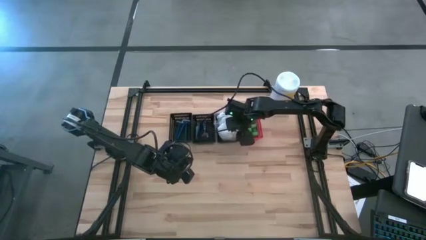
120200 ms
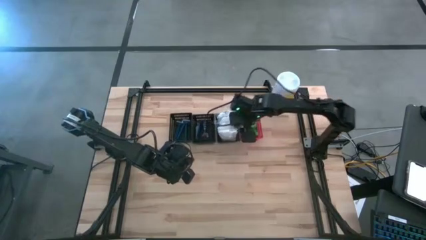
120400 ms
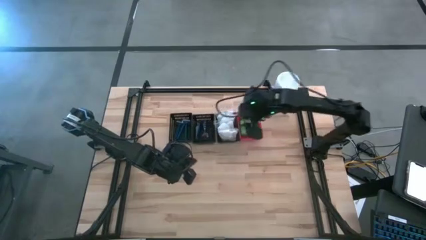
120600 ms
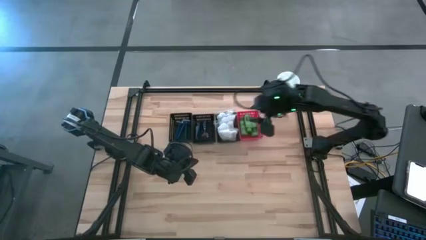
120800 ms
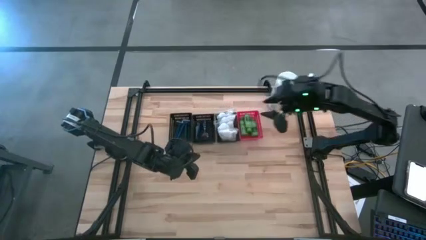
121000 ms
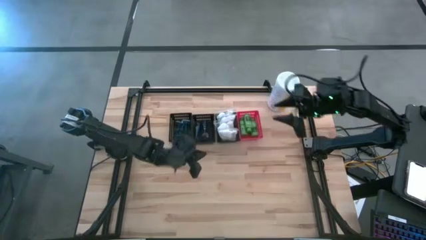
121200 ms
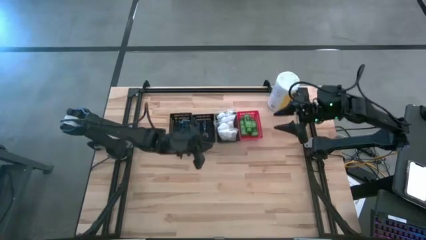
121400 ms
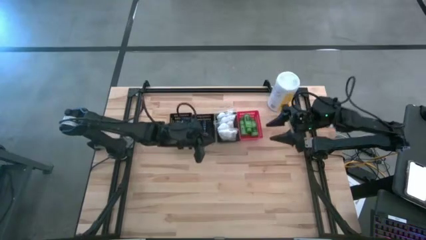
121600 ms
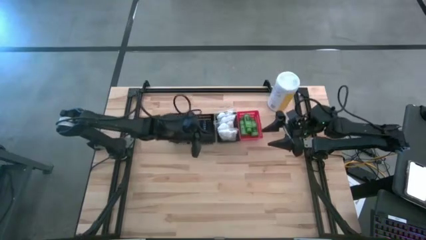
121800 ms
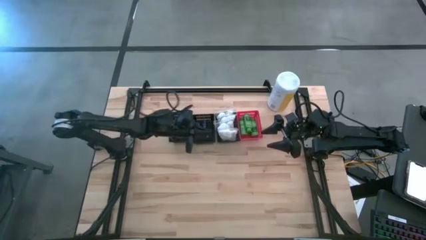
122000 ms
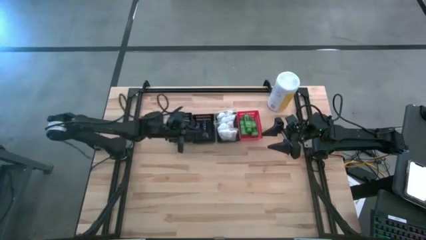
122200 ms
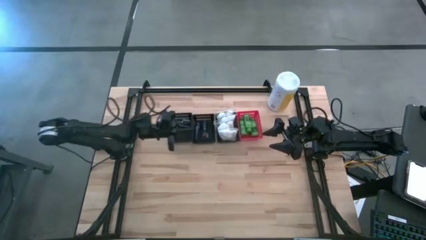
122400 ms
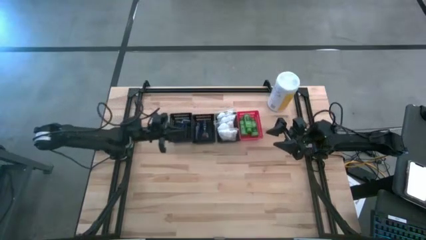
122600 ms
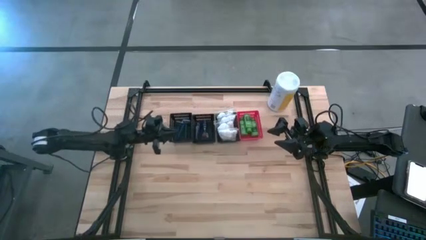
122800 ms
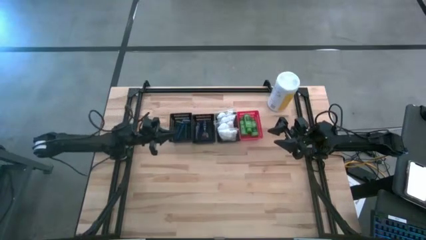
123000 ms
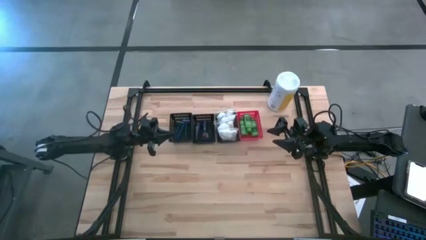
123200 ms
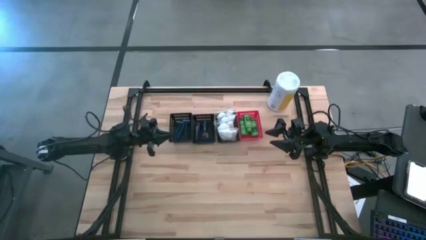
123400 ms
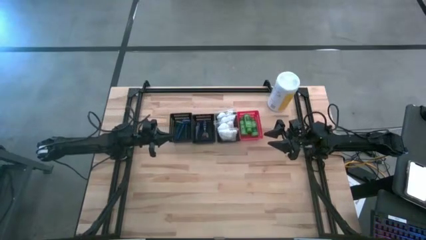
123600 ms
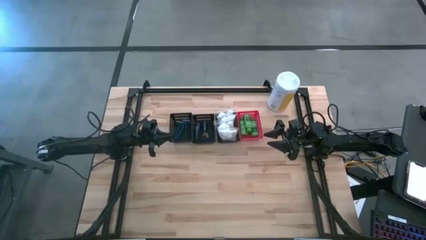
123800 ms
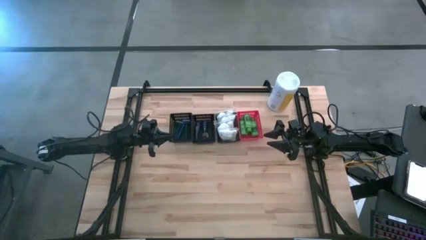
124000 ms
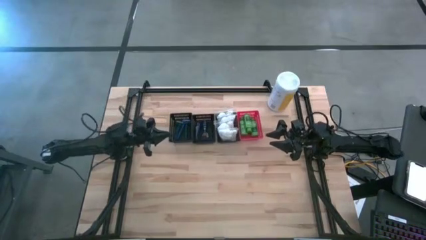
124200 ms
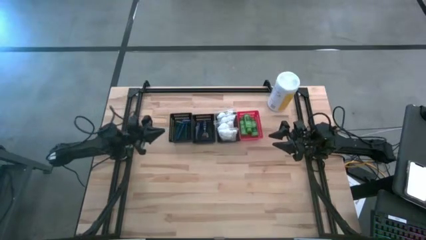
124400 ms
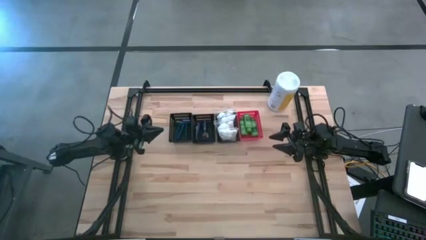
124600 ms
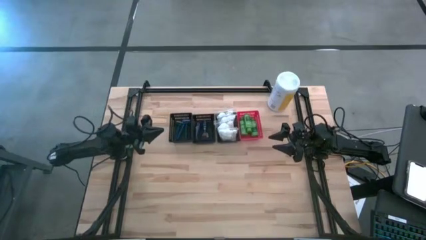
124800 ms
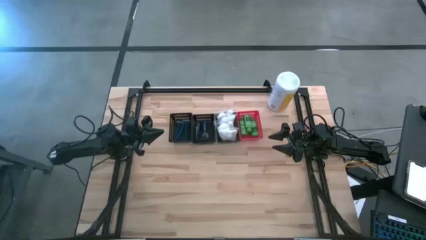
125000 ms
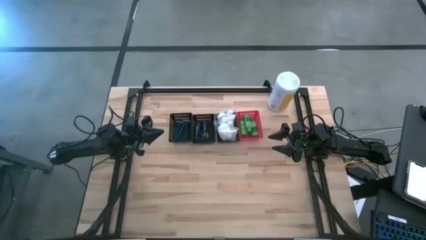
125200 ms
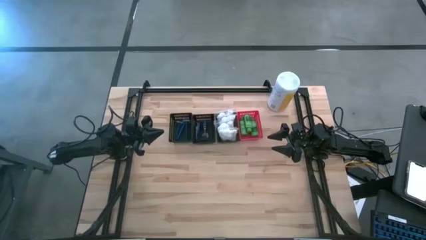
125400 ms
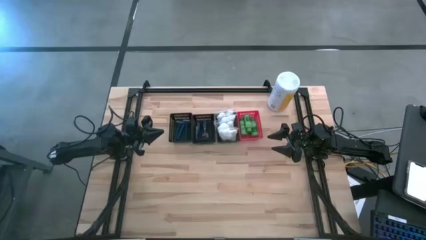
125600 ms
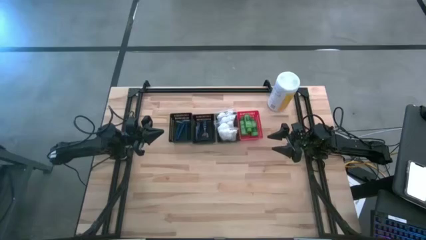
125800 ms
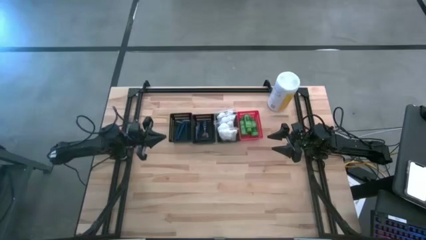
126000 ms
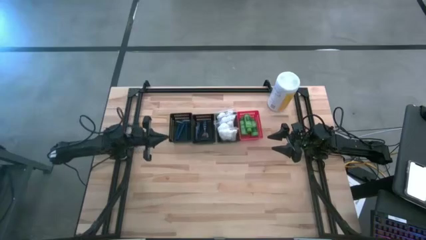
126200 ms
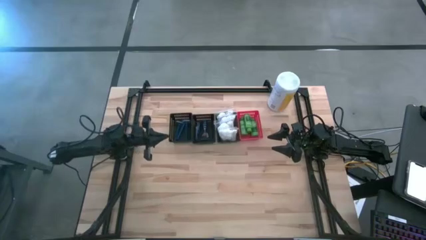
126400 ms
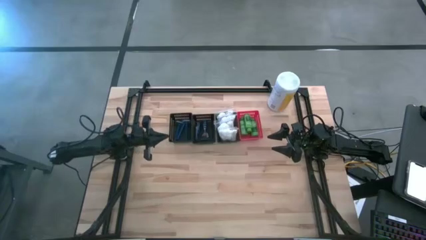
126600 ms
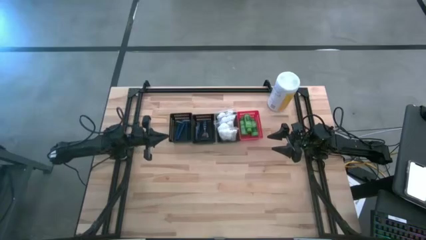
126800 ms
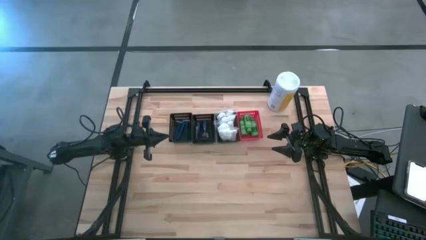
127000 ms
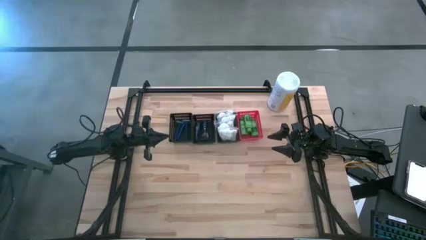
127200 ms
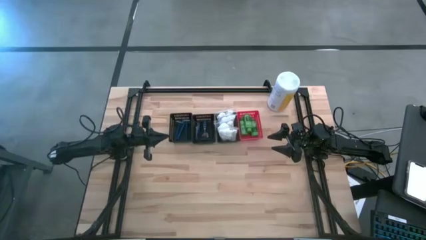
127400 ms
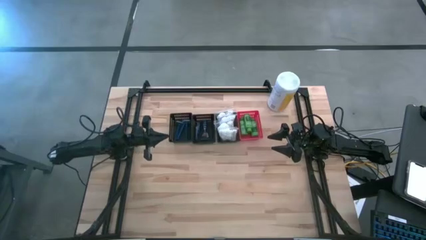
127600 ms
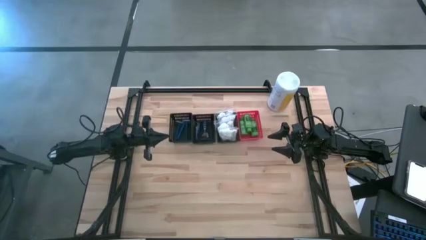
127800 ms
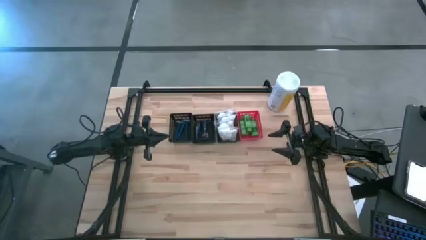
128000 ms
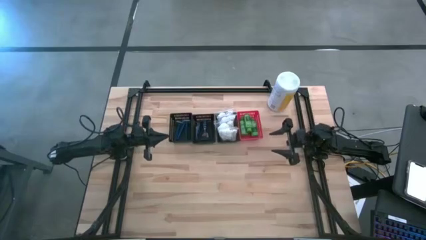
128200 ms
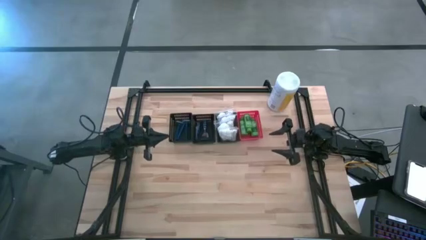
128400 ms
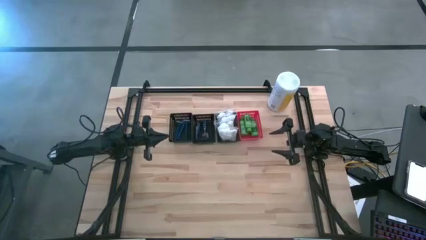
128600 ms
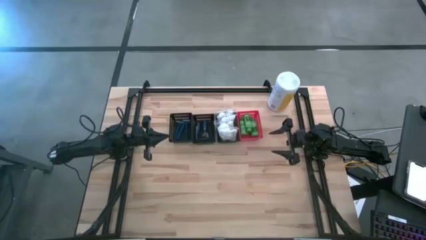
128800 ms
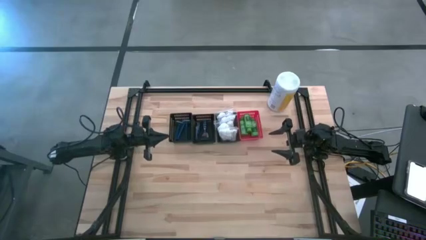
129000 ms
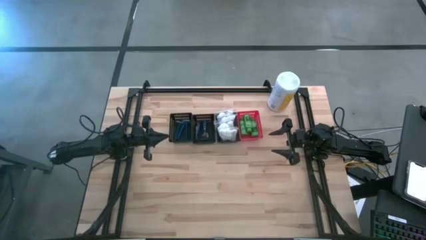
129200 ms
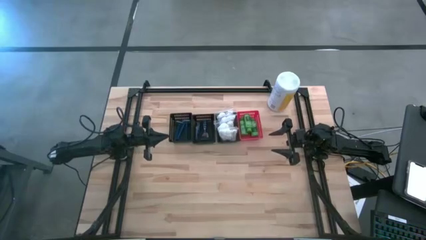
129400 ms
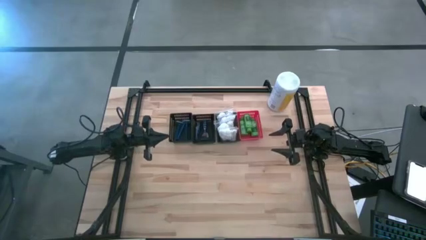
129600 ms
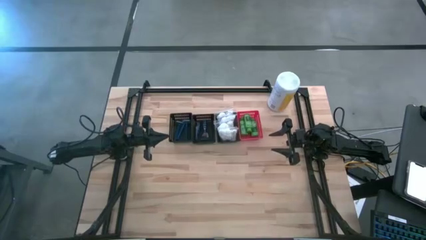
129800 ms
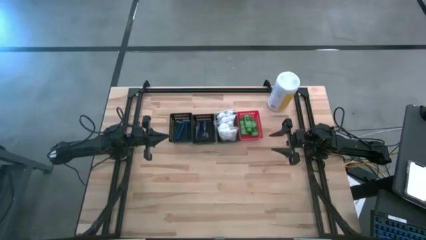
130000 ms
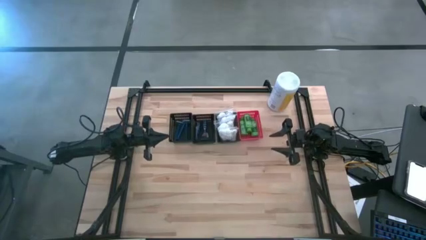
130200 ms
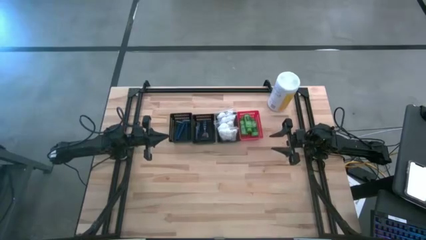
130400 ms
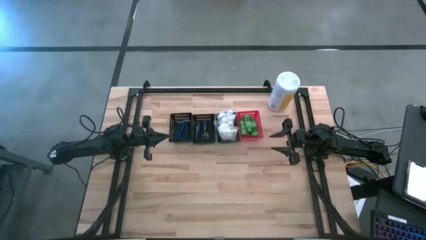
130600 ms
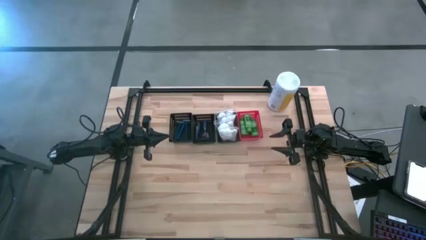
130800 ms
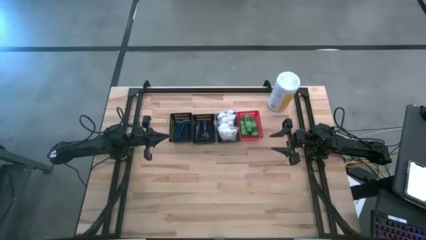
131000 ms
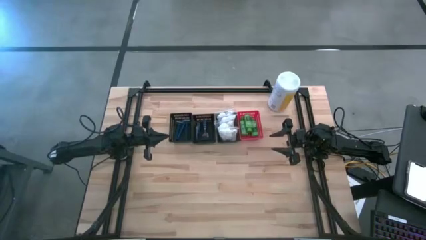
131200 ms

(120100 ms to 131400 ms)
Task: Pick & Place Travel size toiletries
Return to Home Position

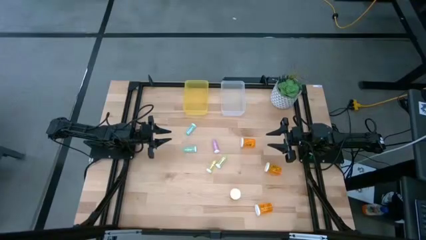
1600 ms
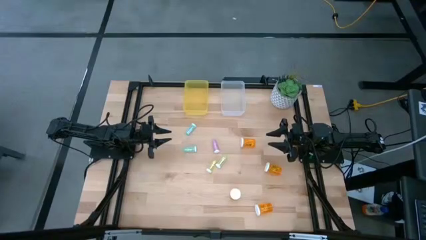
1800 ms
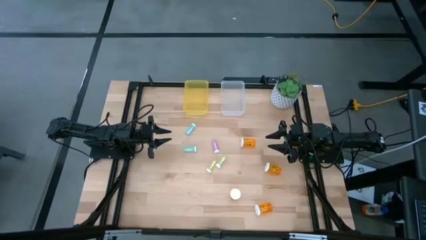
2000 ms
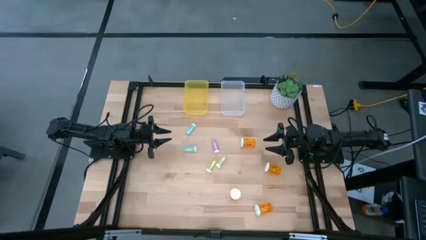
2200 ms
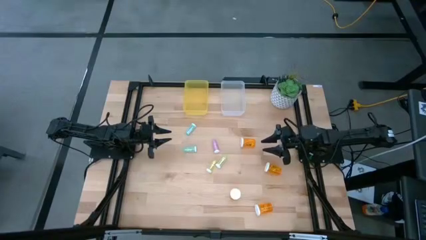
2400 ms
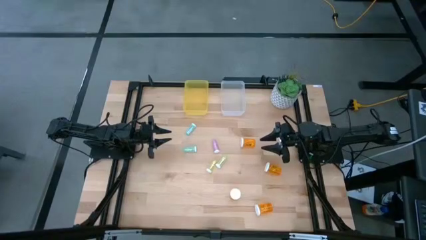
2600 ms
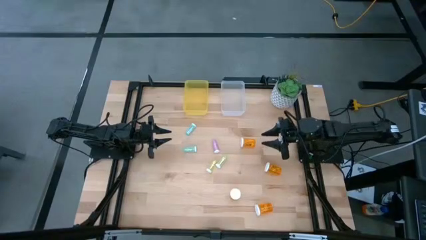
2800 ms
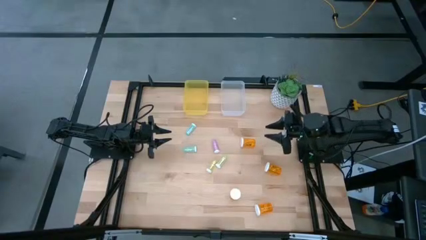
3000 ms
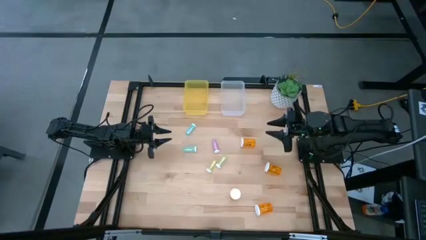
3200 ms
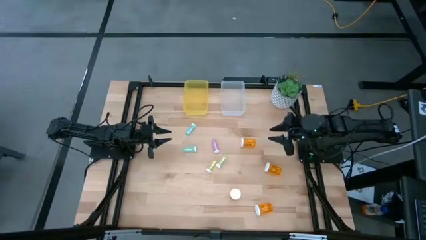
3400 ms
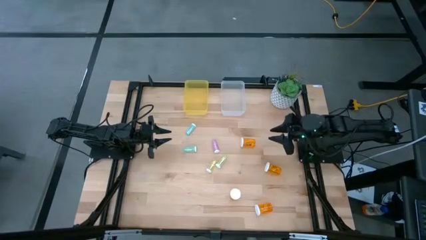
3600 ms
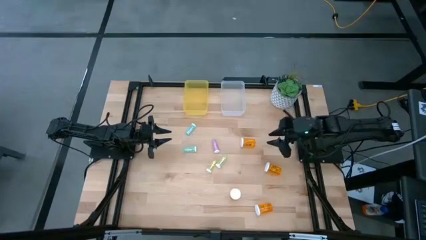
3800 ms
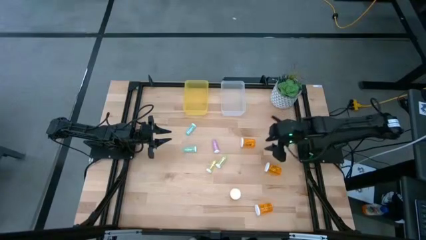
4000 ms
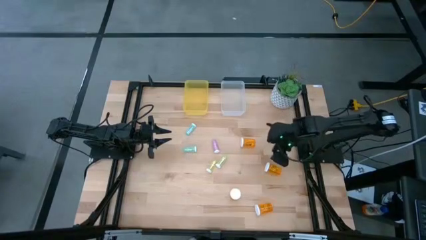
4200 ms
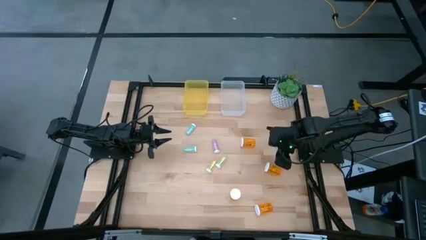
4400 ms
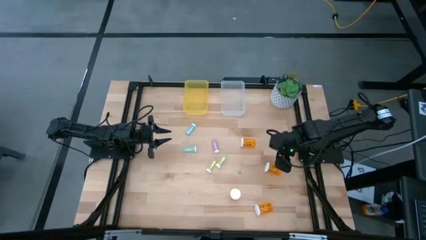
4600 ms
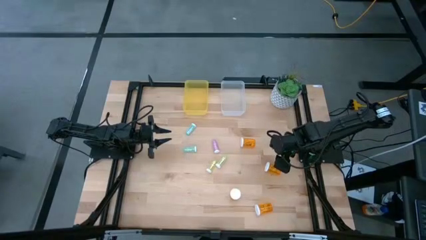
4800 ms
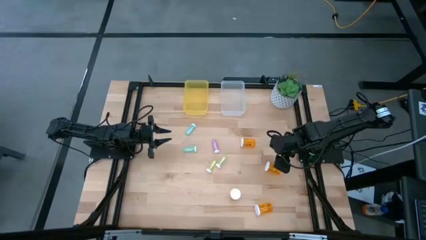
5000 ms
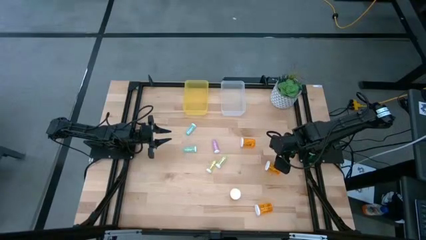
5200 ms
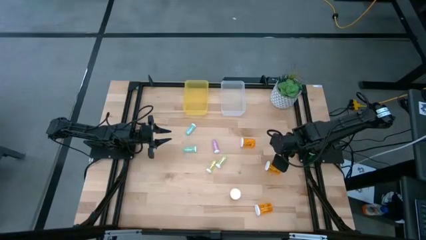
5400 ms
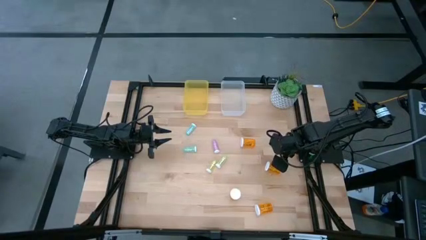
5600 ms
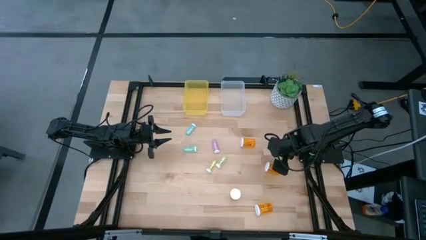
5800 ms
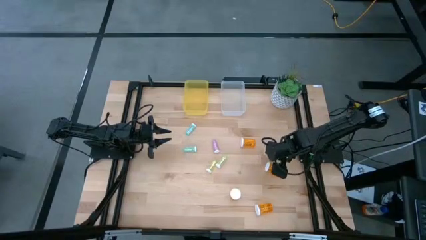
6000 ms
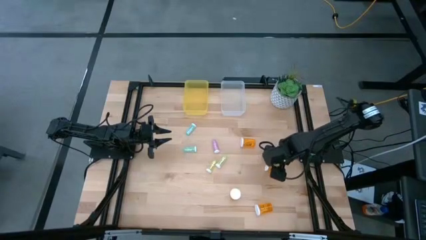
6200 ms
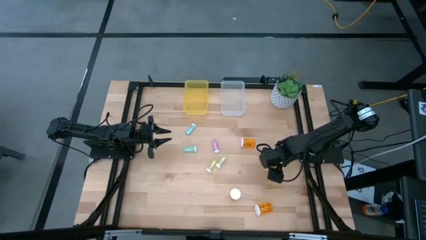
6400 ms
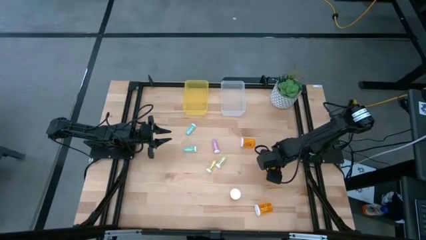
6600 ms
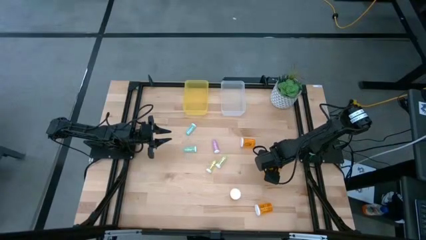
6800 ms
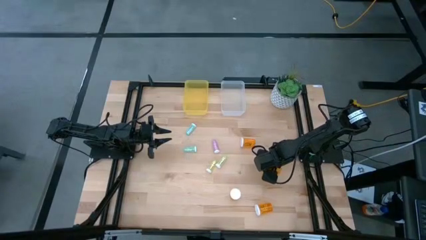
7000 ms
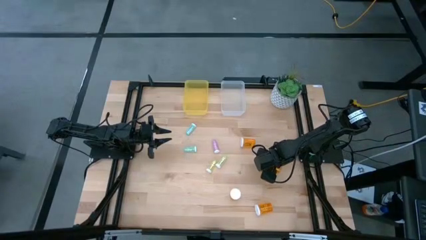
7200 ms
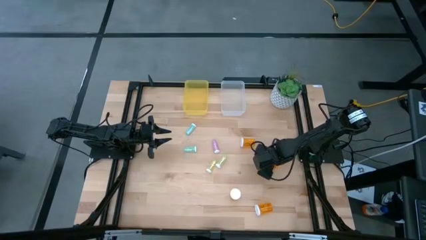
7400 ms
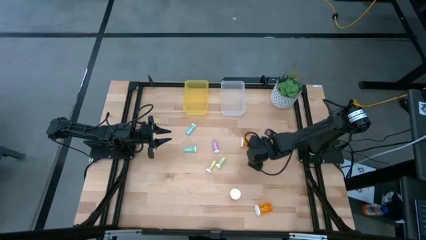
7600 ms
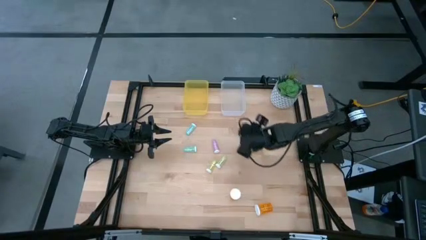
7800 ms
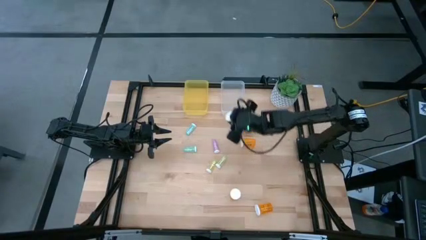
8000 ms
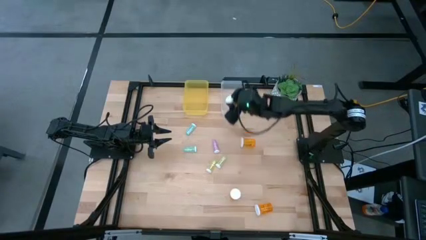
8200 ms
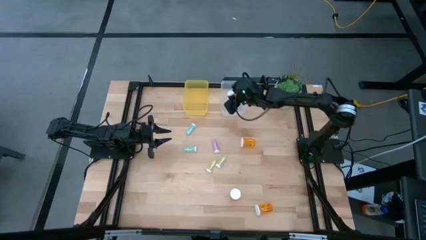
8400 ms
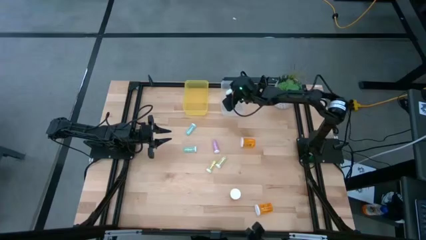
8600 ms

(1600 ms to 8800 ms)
Task: Pick and place medicine bottles into bin by pill shape (circle, oval)
Put the orange capsule bottle into the transparent bin
